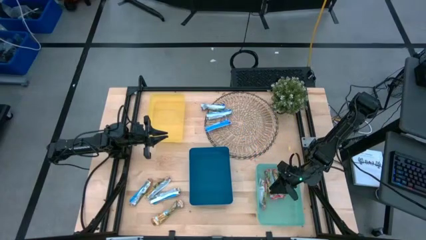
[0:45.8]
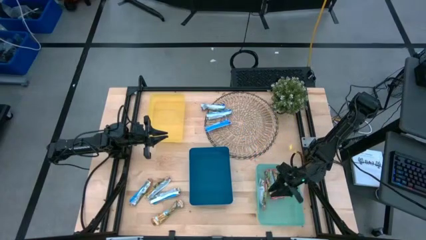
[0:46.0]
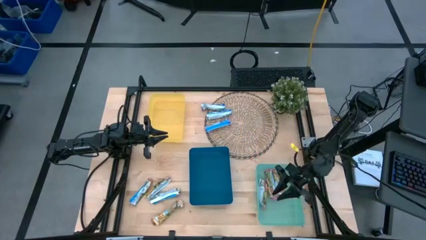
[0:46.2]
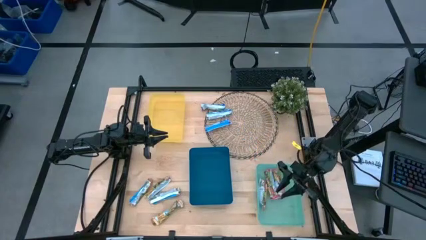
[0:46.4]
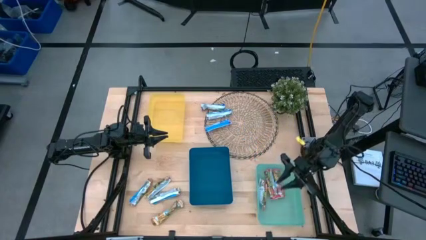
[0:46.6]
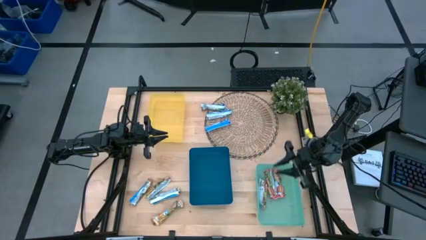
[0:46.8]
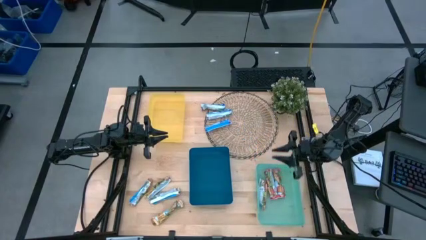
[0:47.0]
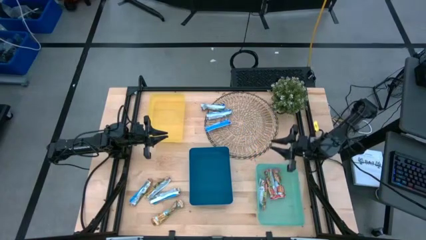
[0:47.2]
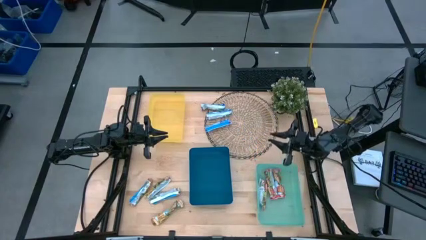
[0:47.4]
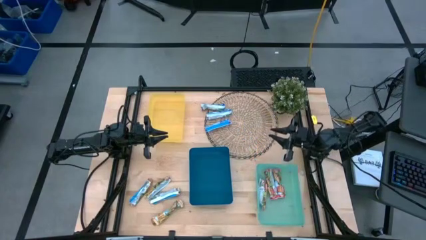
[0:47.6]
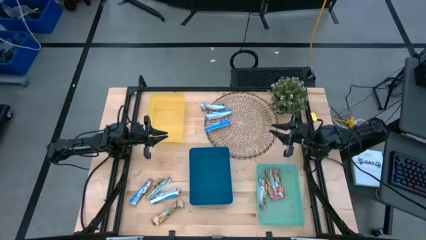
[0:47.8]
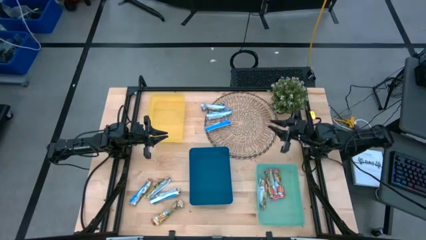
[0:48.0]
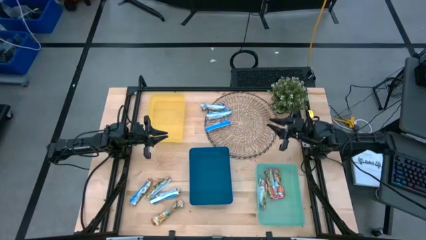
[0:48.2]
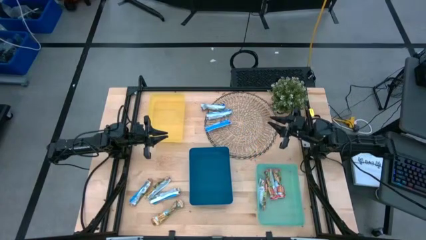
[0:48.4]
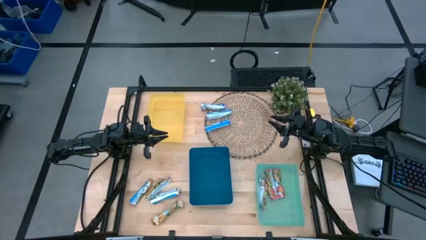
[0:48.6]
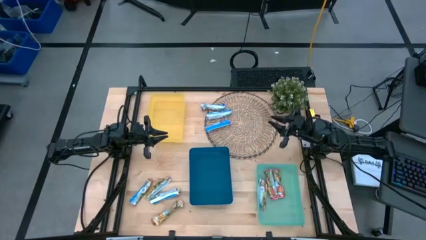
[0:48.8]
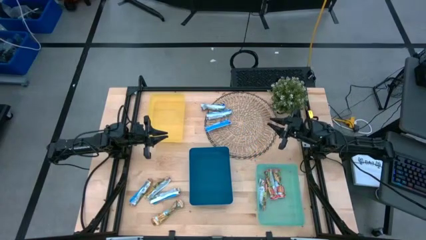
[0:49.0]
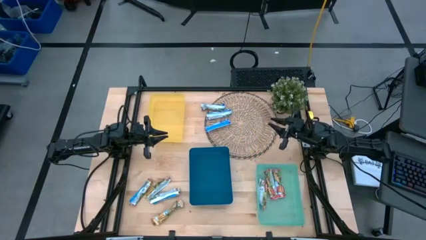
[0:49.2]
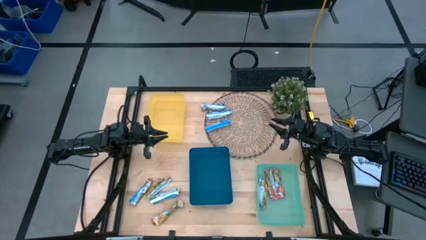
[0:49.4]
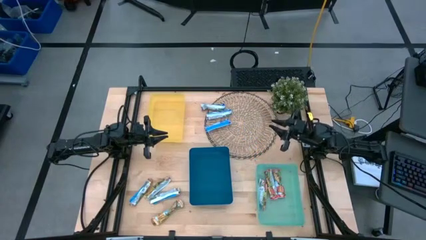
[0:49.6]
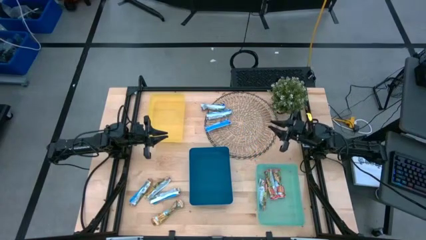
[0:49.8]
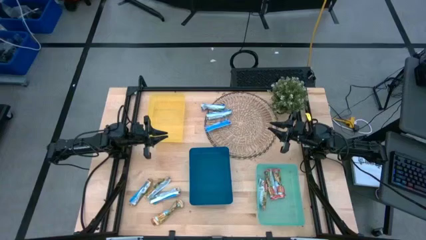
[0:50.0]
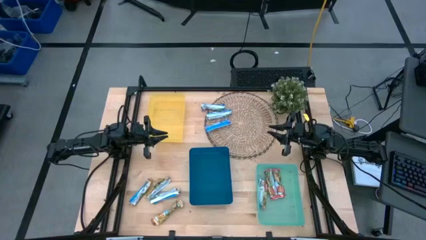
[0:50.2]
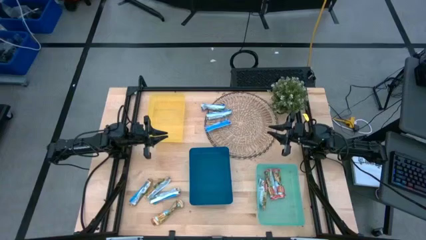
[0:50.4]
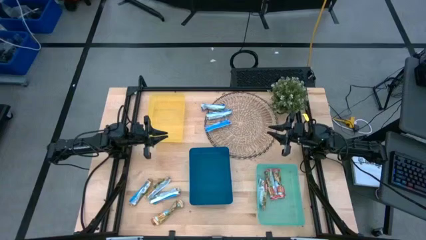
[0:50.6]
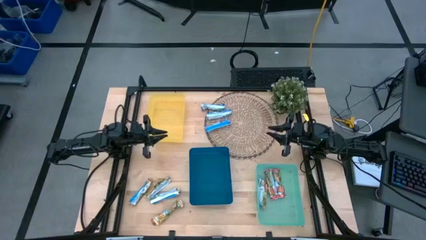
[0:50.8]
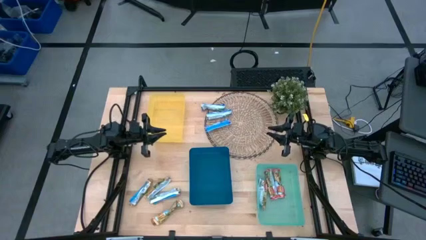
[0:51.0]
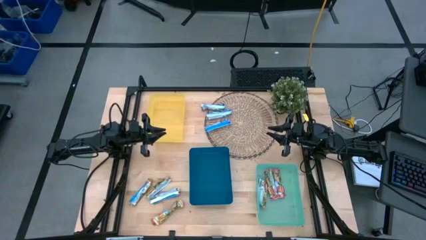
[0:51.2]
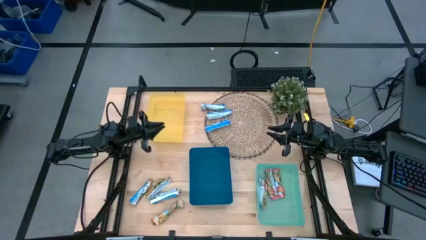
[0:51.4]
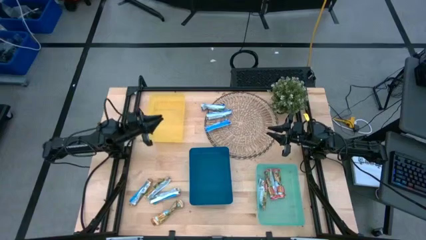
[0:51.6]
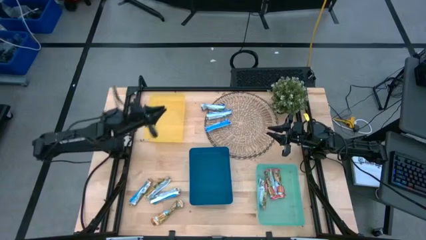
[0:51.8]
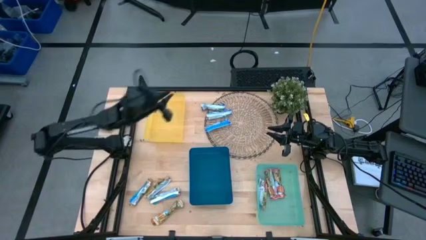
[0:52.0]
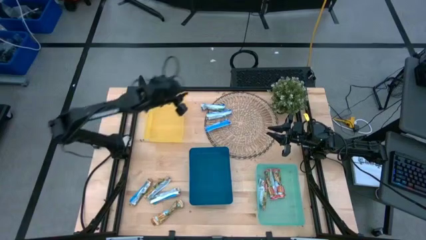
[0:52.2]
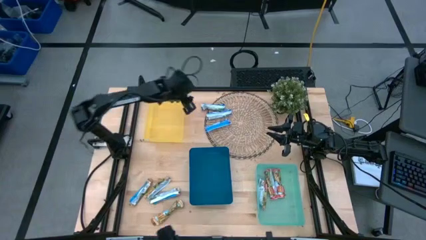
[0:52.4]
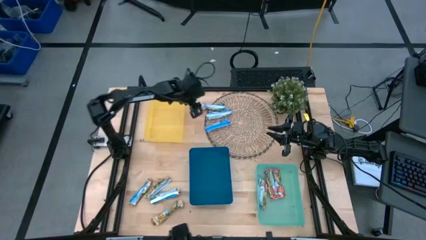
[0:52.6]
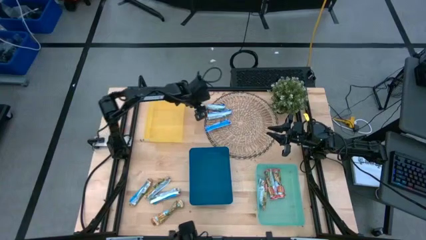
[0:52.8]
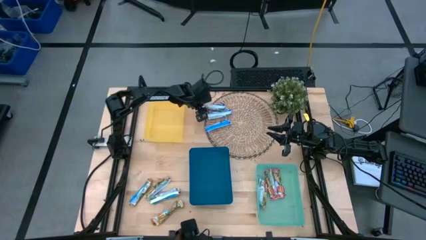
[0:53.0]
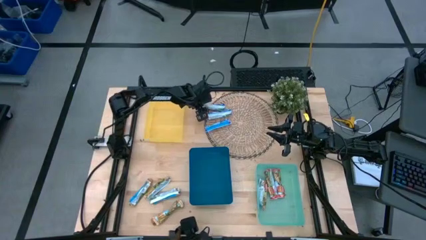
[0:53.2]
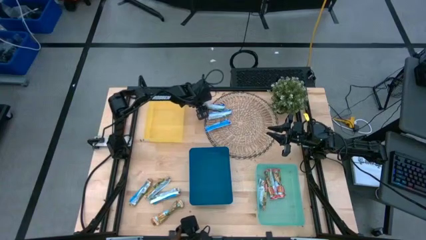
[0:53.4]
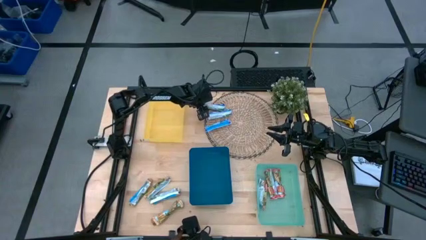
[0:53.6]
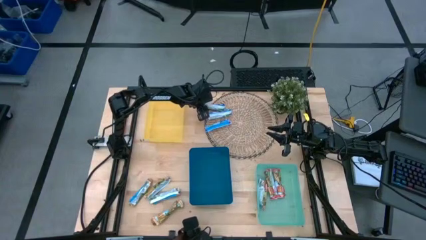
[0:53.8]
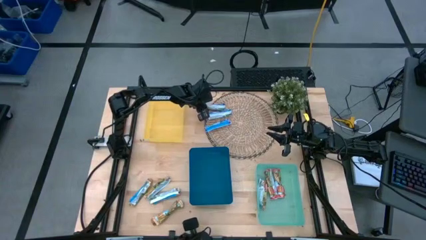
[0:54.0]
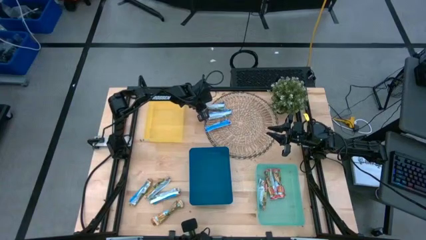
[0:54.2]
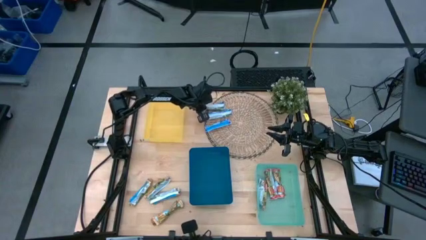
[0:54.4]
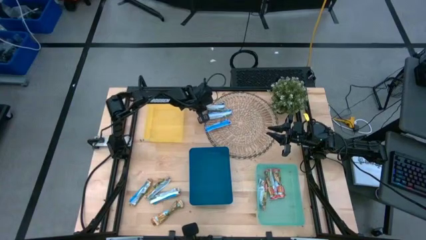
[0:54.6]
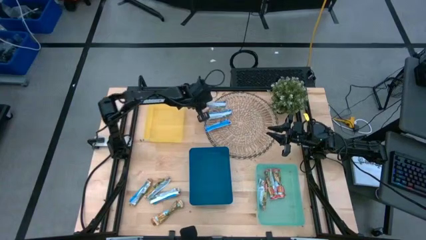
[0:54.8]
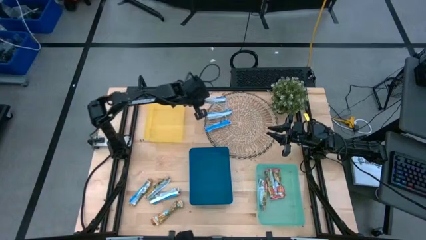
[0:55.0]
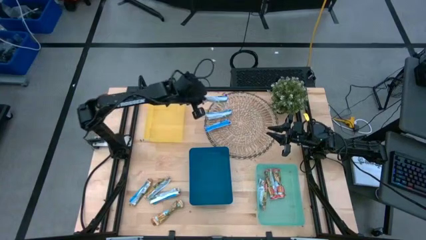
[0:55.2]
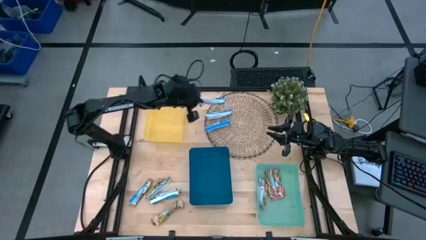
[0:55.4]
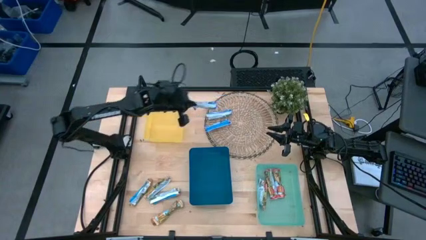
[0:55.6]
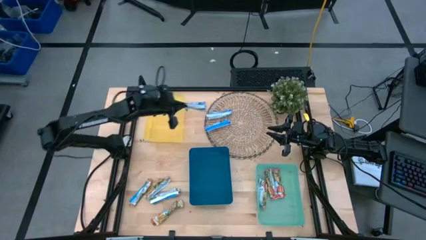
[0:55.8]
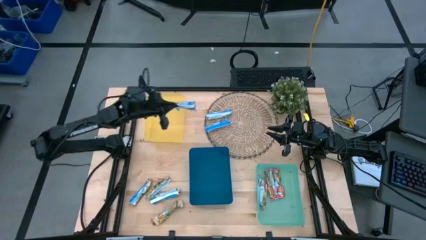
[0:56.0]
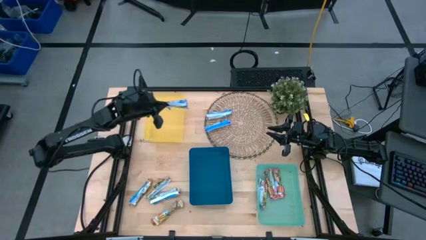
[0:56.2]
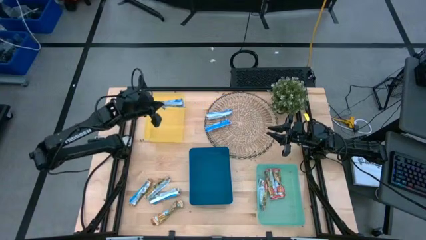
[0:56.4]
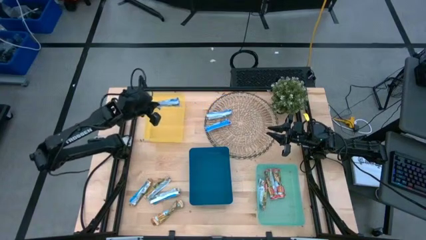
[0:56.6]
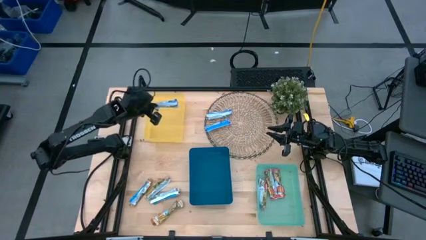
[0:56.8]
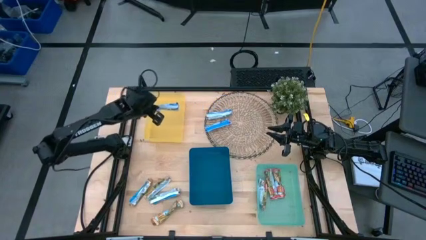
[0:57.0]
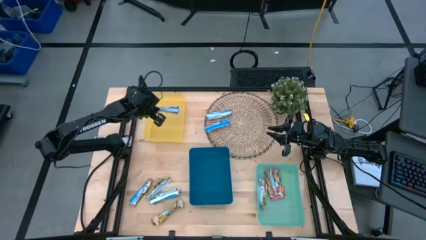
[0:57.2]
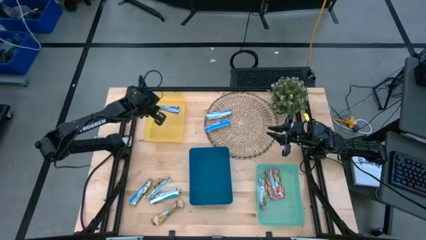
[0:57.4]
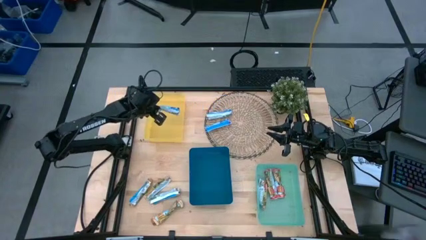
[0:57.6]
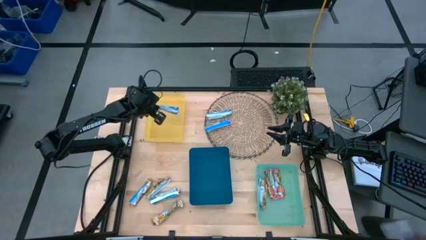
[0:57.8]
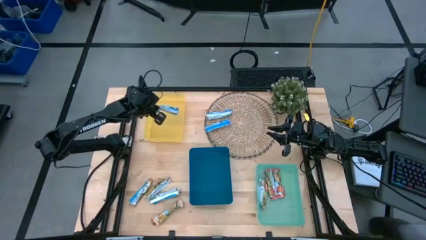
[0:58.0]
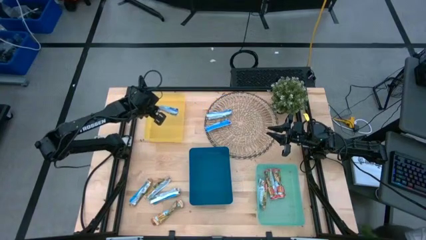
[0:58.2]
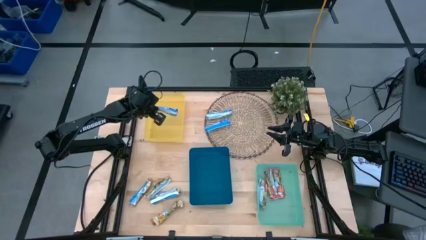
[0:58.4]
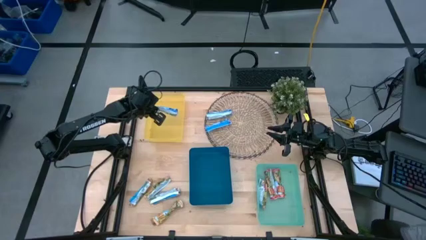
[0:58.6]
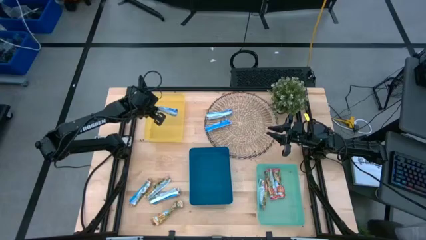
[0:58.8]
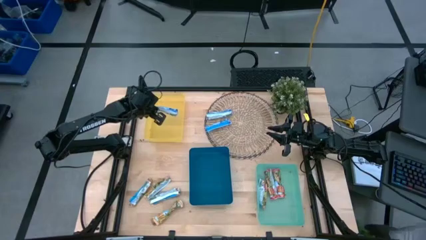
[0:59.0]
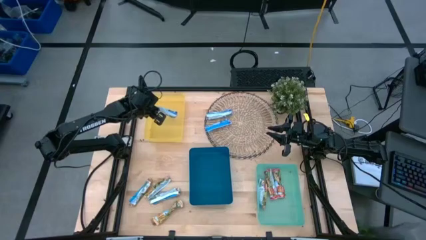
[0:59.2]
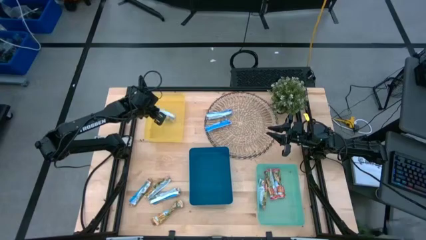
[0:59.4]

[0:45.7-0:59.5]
Task: Pick and place Granola Bars by type
Put the blue granola bar into the yellow bin

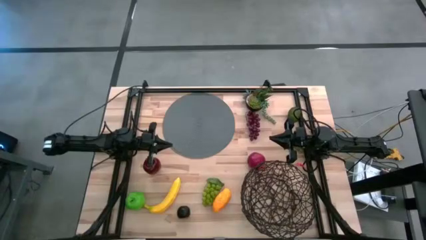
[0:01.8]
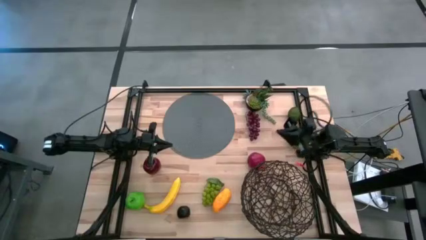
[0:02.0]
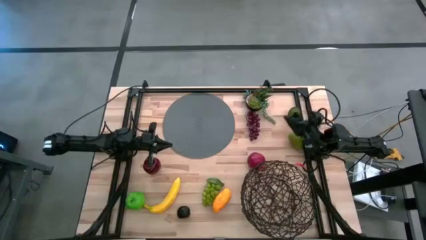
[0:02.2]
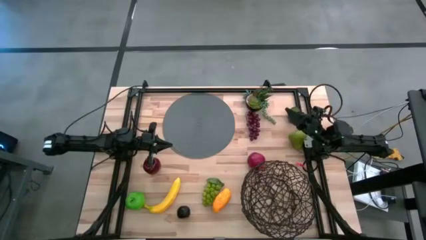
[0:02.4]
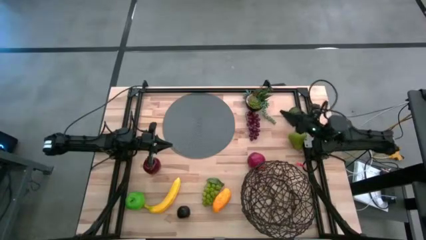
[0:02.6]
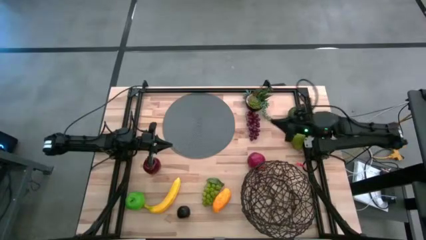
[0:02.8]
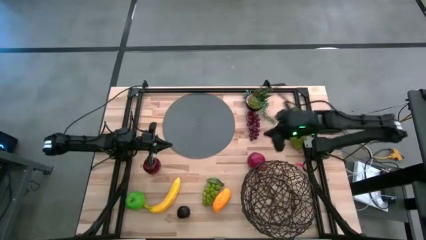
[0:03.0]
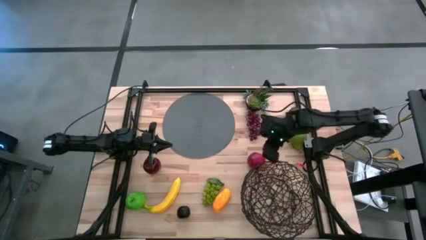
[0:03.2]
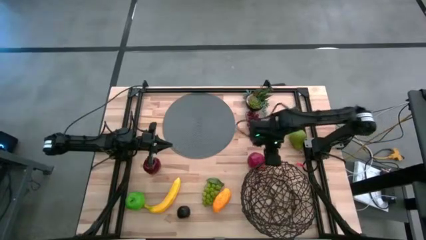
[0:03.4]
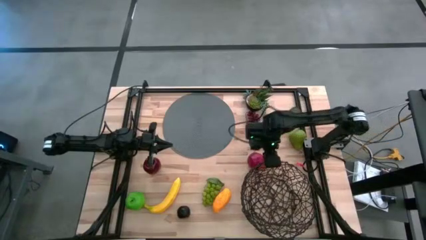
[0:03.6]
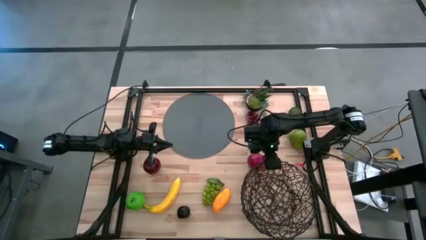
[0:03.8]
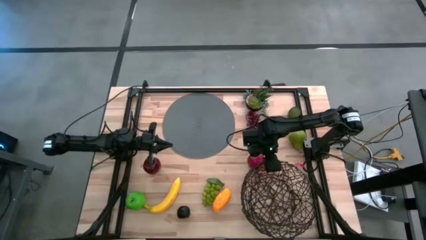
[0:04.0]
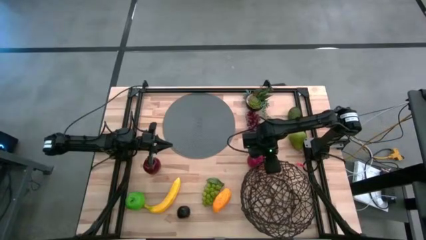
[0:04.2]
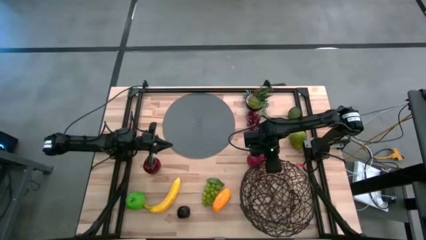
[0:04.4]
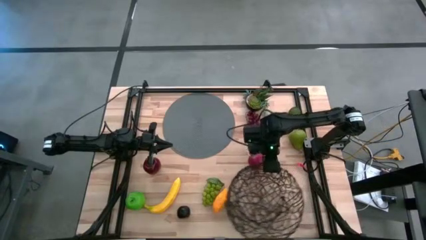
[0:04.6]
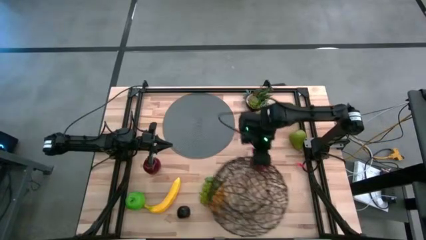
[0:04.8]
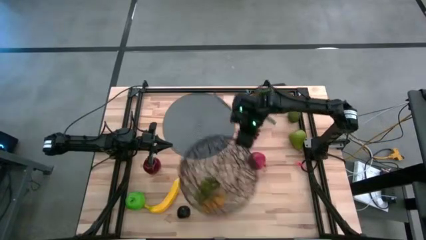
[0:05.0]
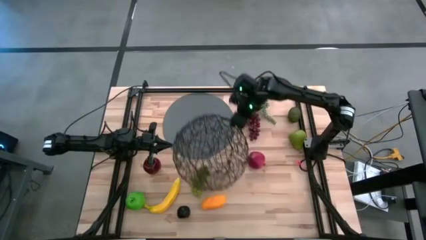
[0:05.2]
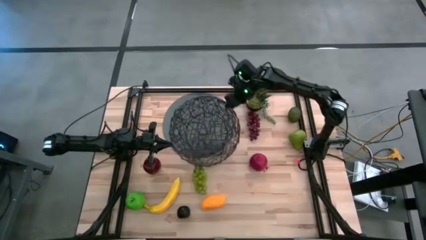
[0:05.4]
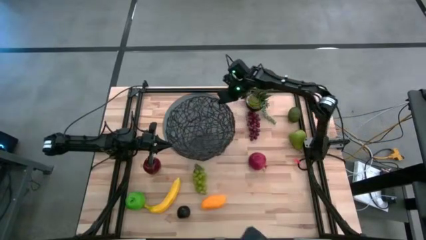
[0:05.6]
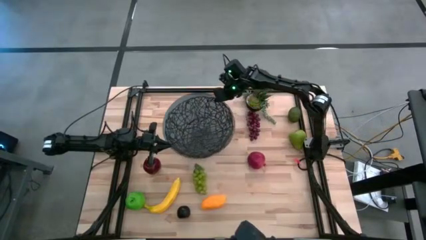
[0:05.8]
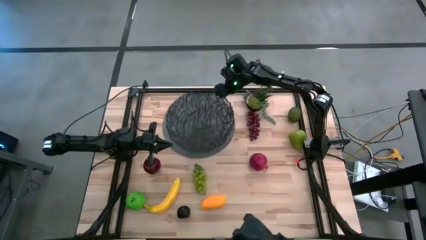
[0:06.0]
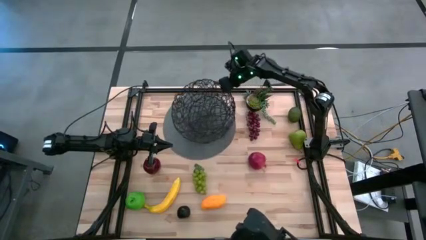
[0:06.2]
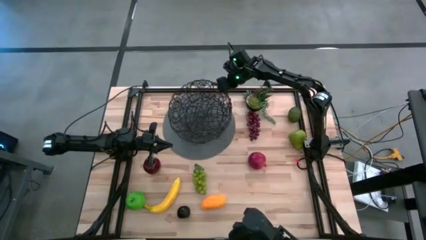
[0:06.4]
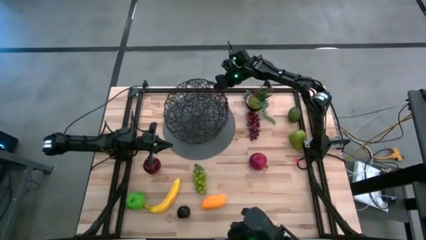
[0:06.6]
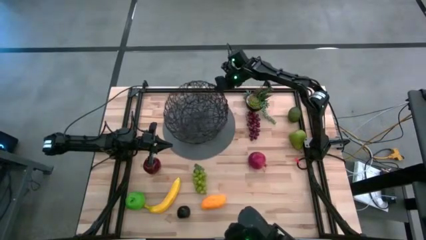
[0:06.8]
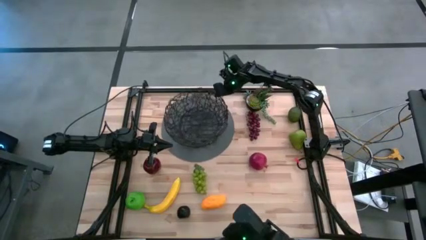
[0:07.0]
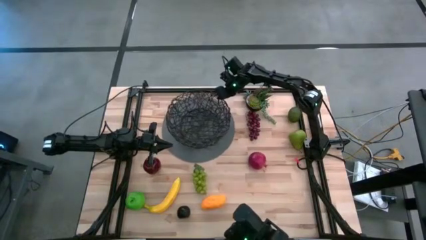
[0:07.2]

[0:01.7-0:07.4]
Task: Build produce basket
Prepare the black wire basket
